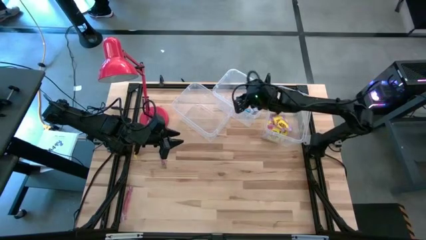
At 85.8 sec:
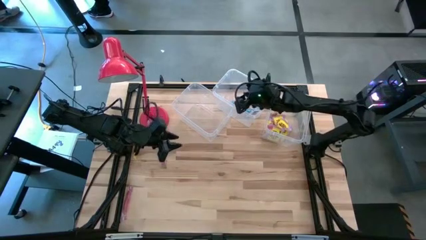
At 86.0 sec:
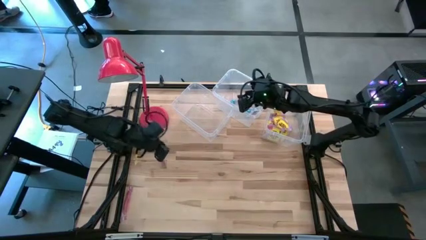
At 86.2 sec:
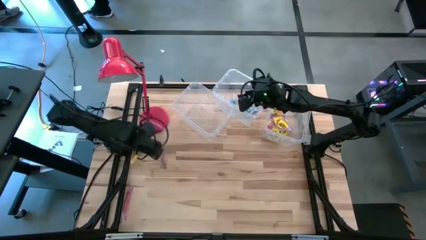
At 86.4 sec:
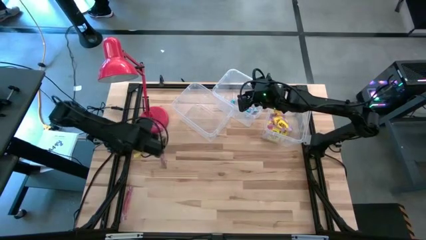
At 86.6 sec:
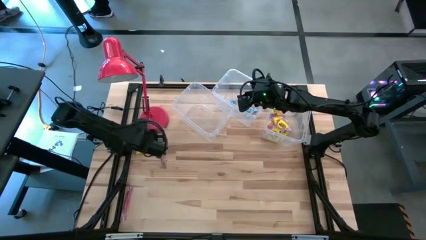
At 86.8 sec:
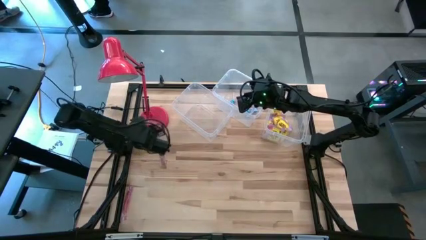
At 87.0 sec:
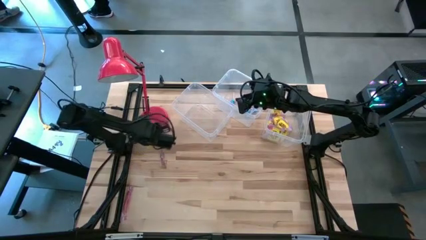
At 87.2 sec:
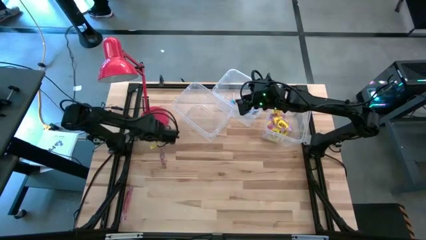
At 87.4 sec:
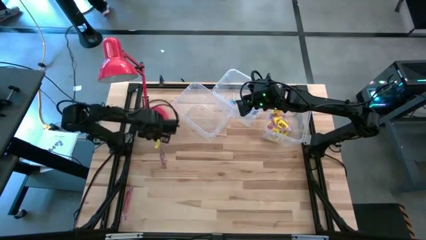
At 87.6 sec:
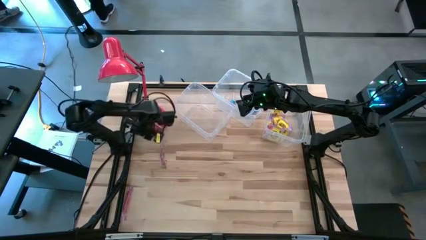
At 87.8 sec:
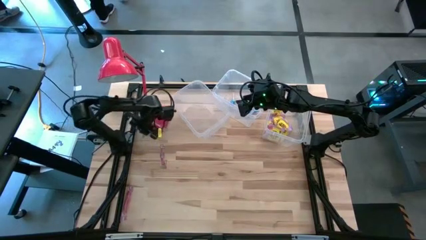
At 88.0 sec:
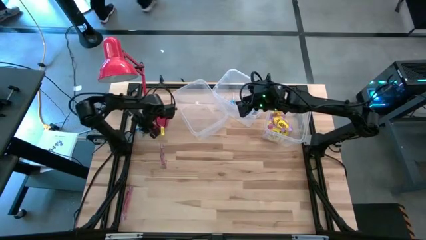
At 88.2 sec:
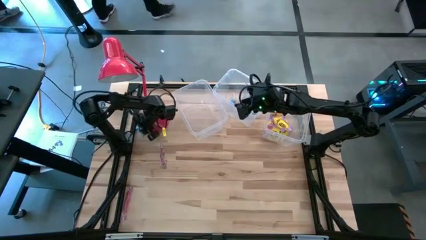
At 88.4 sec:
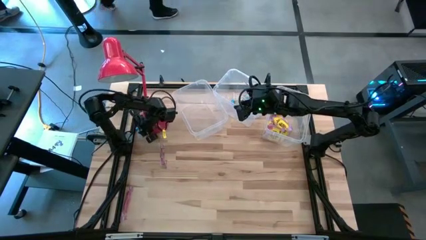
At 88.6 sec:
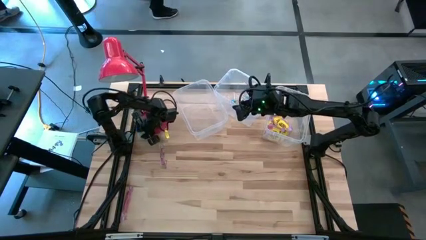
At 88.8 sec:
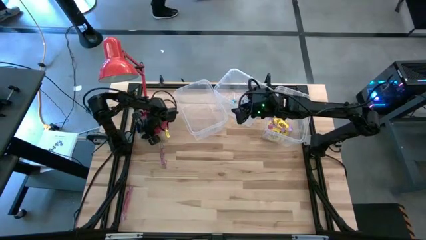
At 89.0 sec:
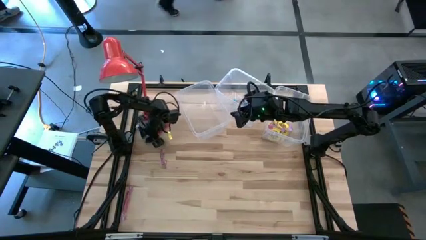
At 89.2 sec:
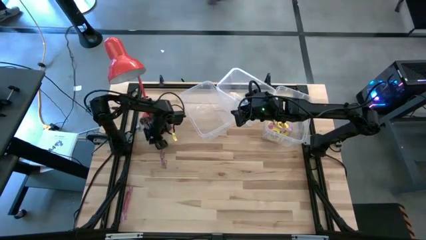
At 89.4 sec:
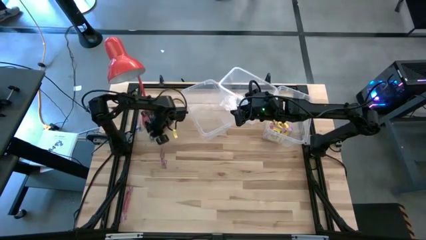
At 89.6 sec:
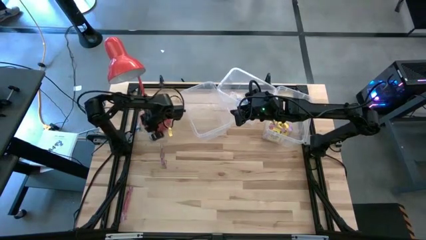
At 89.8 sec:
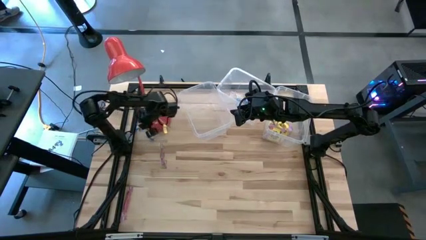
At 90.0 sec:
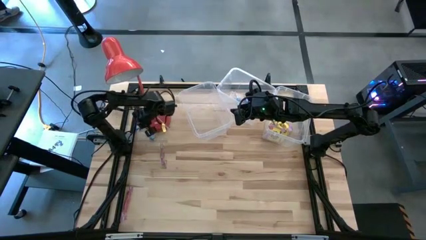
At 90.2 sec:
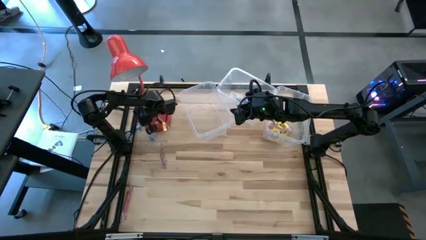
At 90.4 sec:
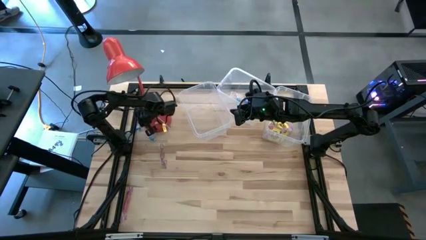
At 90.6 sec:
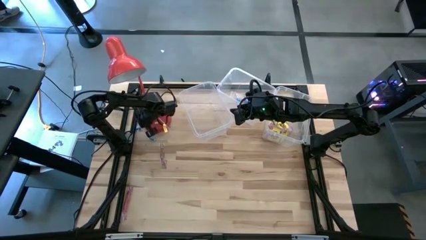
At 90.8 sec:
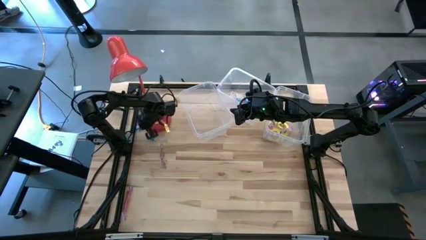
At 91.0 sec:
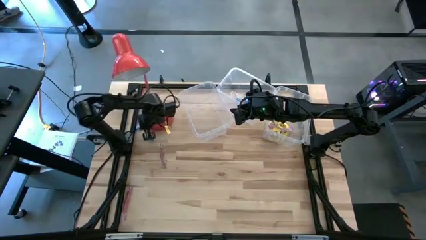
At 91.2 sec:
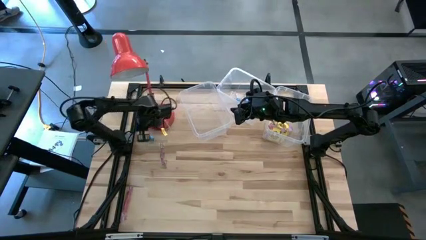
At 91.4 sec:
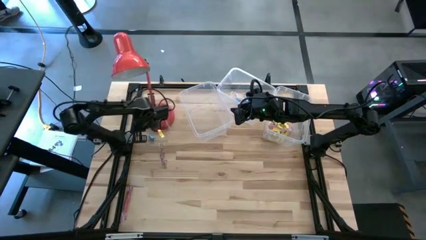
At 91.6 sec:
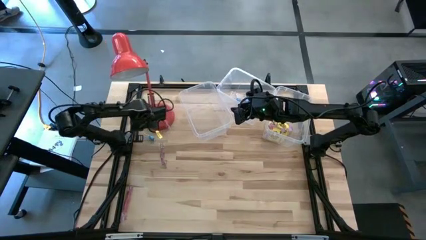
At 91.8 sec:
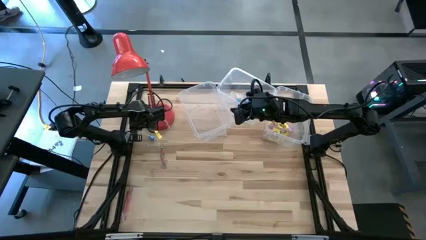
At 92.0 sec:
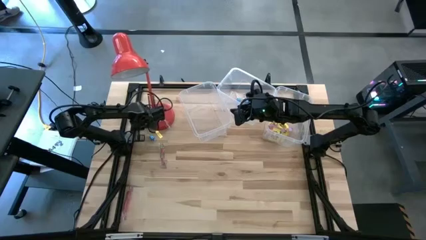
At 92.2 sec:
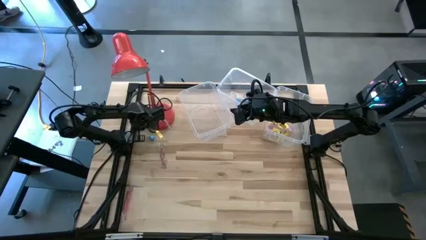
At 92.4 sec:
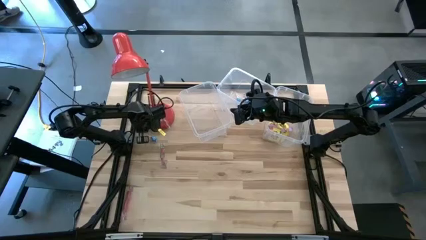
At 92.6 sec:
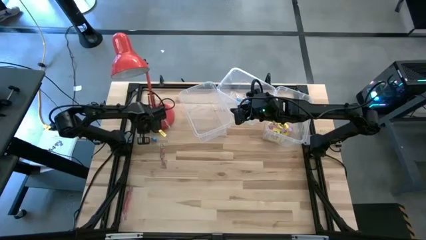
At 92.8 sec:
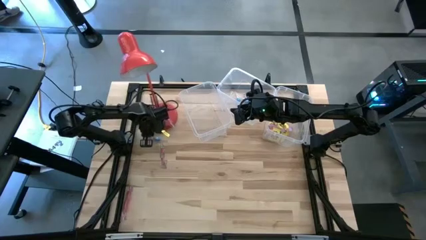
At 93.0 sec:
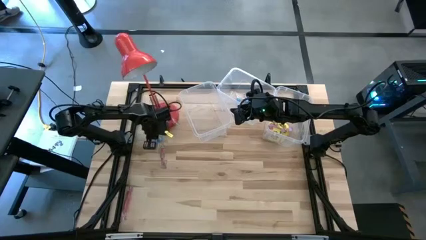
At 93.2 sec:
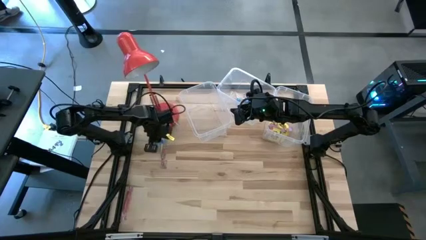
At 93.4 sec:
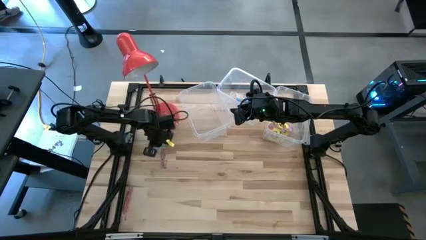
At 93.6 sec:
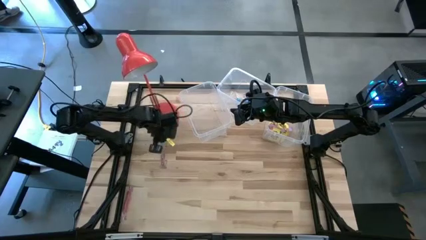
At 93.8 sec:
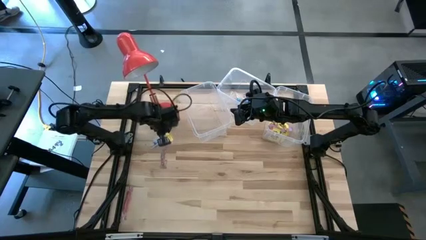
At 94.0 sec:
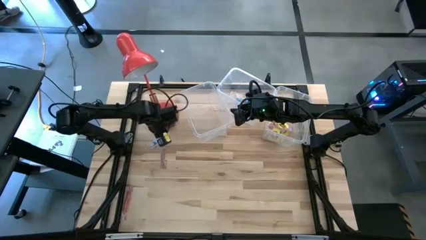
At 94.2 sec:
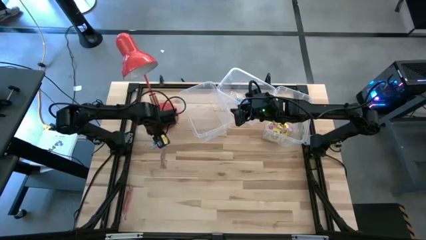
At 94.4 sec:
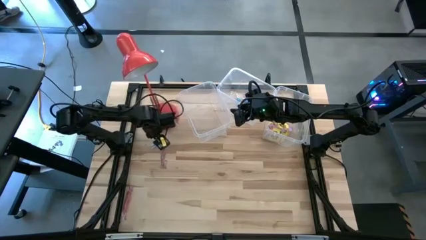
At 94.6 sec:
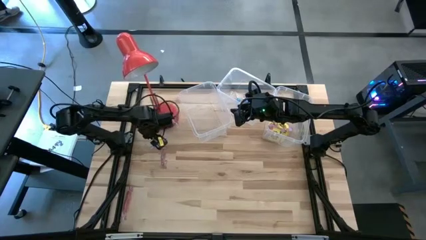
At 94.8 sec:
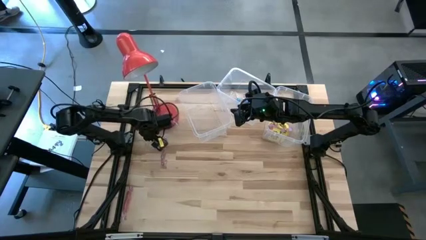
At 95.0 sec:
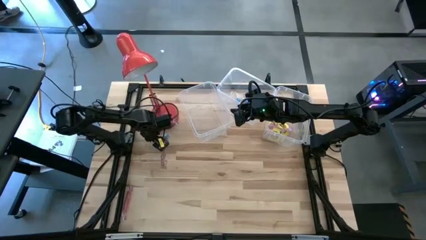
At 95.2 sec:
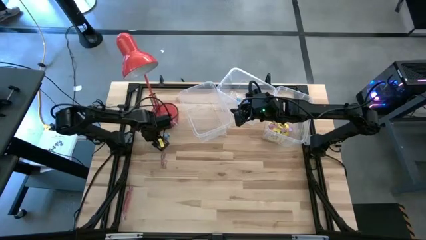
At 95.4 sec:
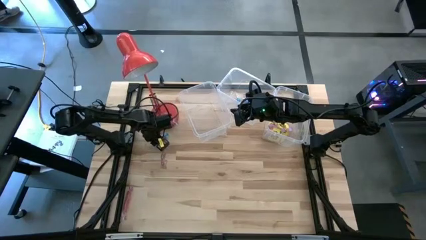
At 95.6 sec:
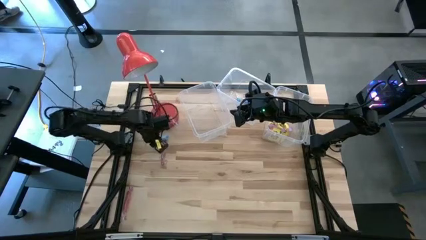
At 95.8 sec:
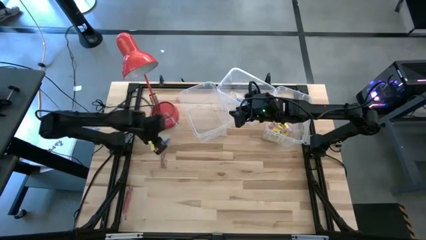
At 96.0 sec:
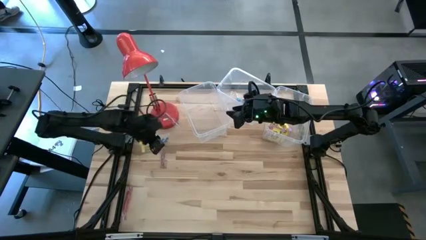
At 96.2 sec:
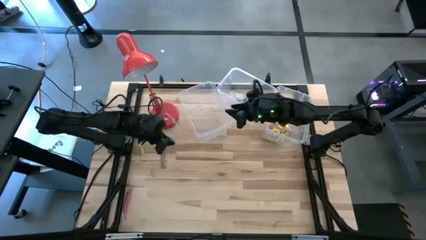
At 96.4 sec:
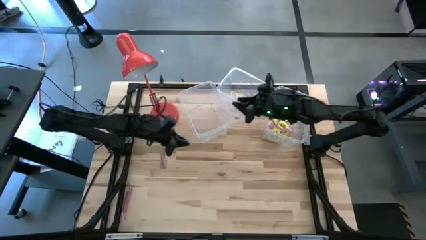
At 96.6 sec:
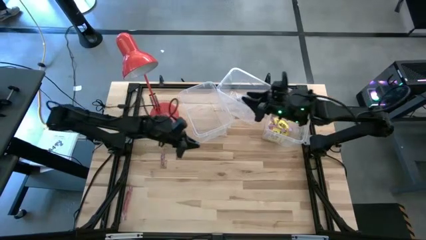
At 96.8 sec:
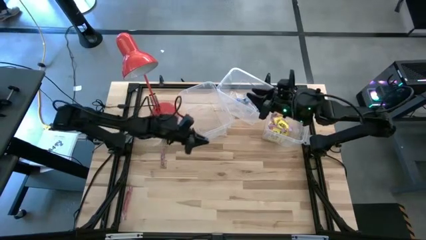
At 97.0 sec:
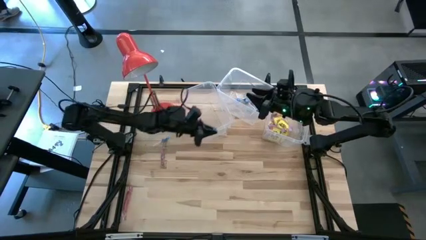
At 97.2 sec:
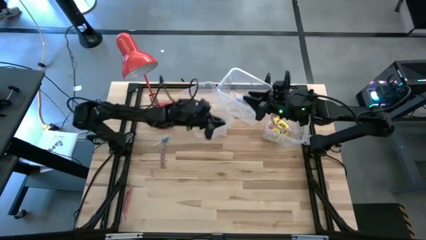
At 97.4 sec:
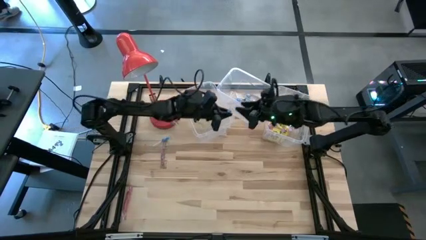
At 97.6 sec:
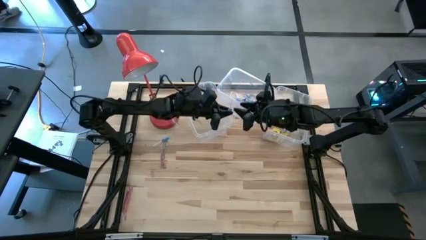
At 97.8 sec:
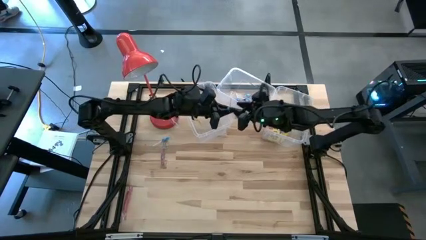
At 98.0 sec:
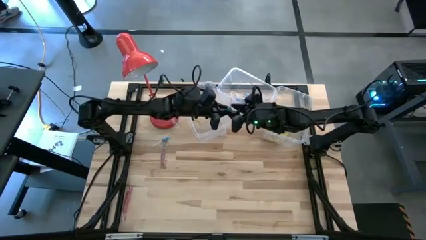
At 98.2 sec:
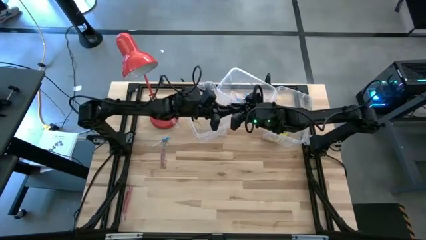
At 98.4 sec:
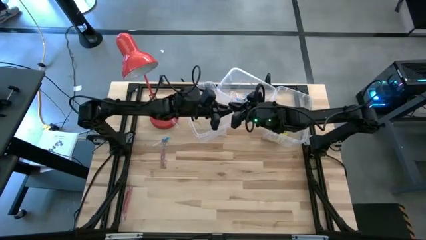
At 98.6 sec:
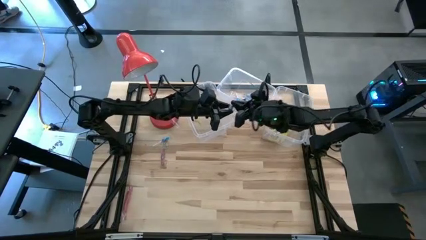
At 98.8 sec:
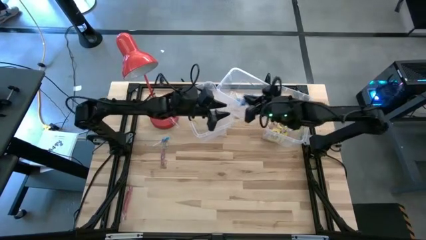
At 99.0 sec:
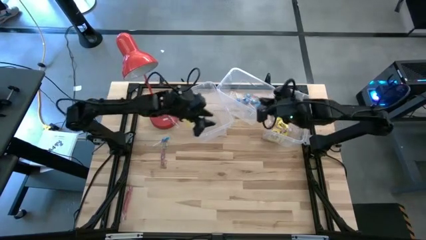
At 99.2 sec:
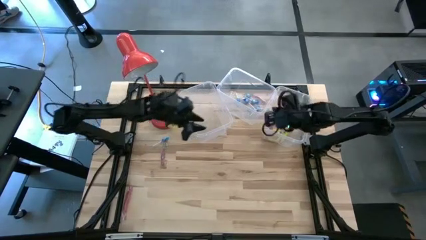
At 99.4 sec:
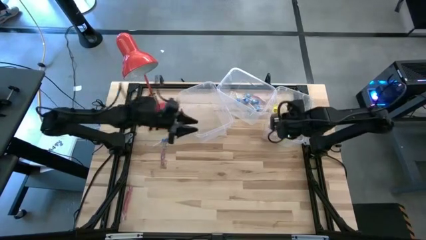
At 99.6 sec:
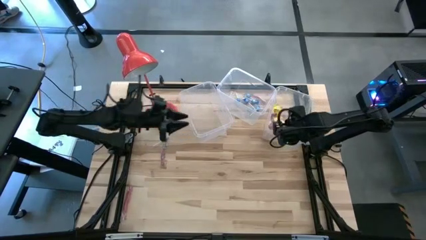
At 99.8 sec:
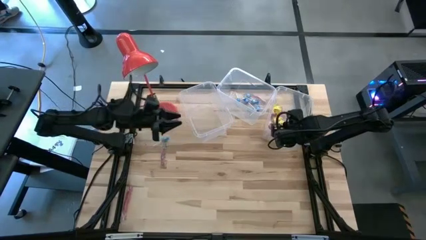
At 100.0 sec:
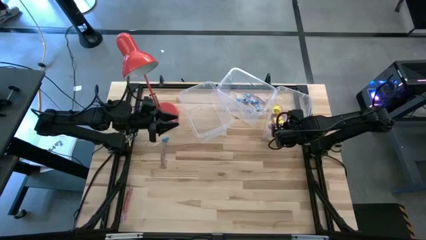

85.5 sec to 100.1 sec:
Task: Sort candy
Put the blue candy into the center transparent bin

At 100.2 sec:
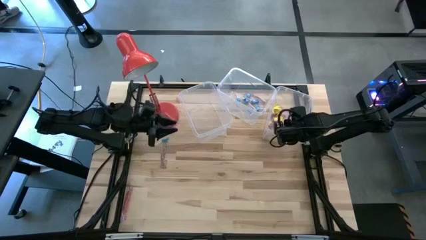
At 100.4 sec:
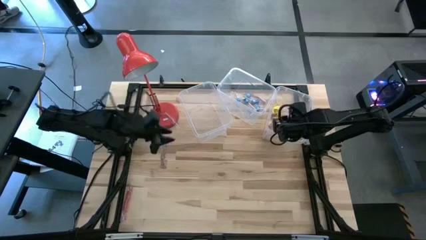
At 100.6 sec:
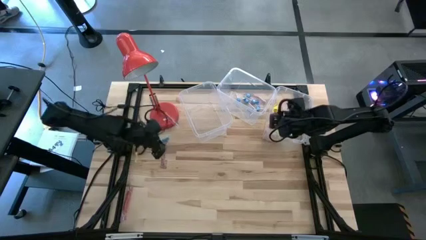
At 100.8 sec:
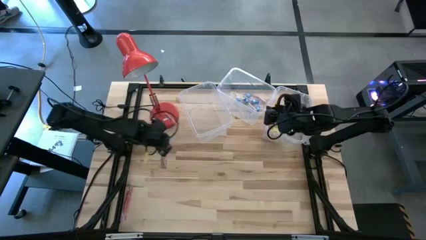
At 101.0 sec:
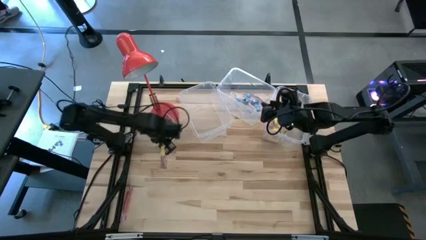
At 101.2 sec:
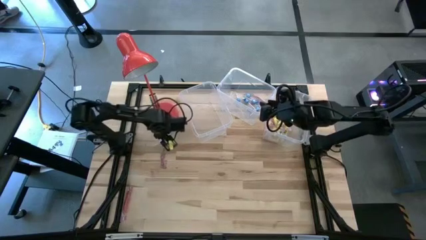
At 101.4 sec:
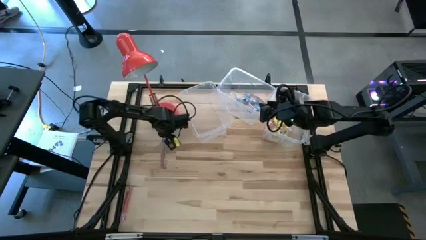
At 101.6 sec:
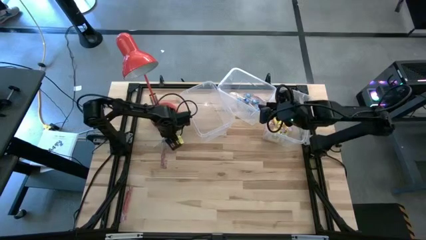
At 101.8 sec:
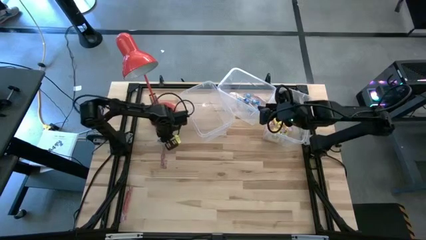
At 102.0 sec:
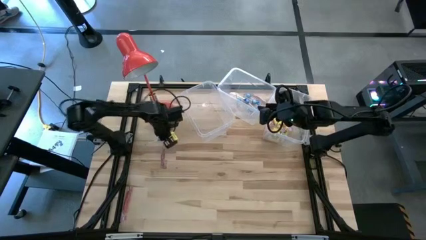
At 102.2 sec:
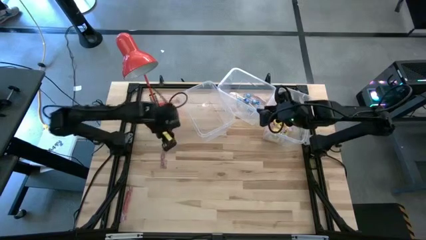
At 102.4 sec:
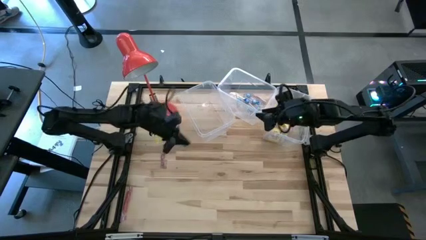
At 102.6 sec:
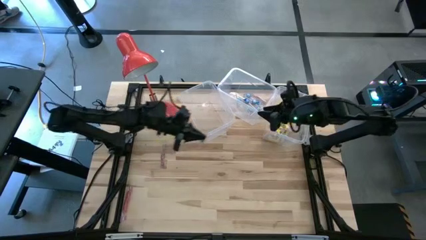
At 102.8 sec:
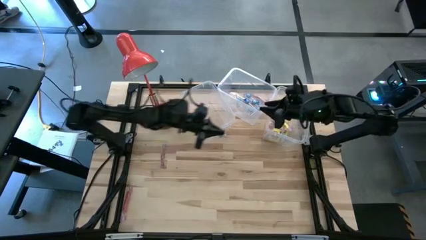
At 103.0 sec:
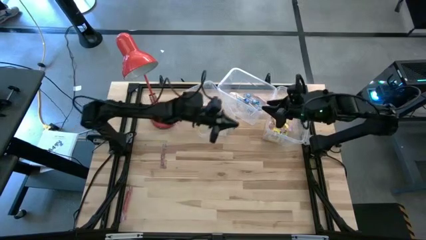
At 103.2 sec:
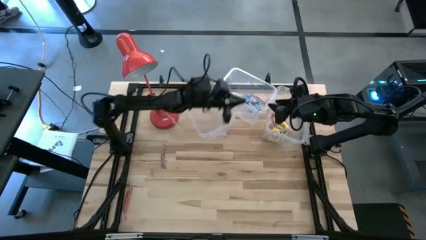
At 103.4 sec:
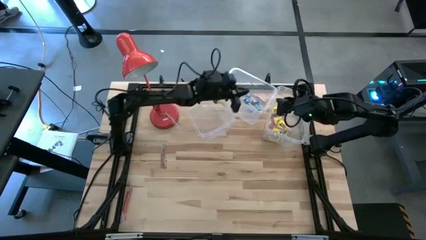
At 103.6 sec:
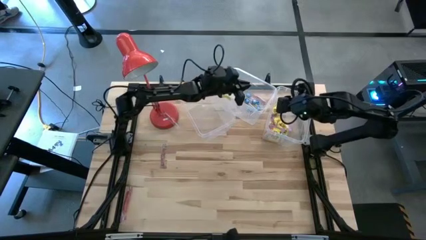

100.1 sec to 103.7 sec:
Put the blue candy into the center transparent bin
